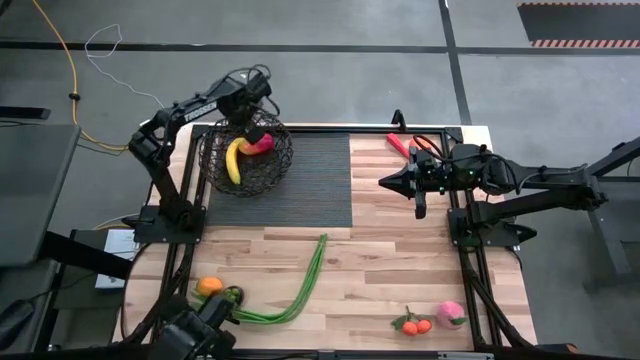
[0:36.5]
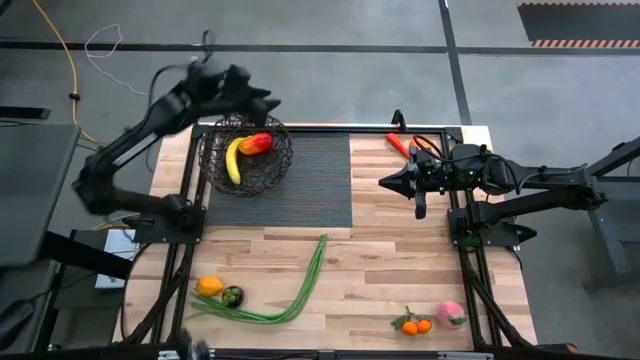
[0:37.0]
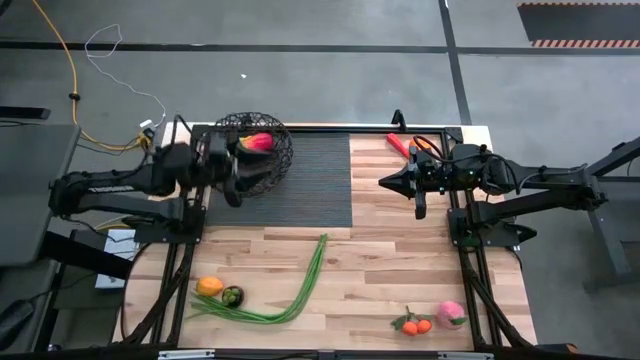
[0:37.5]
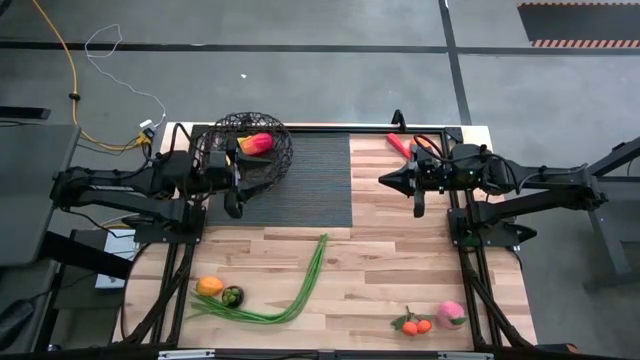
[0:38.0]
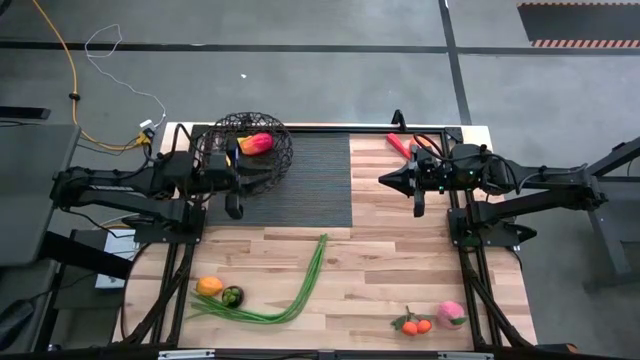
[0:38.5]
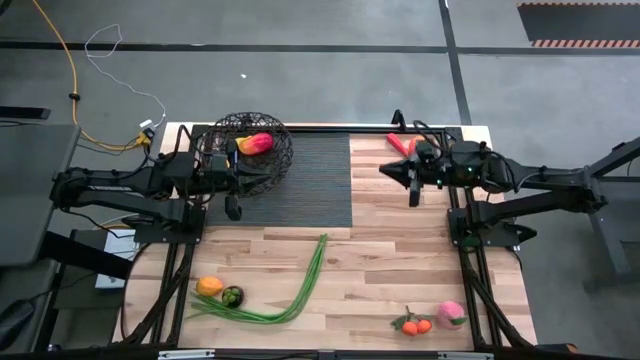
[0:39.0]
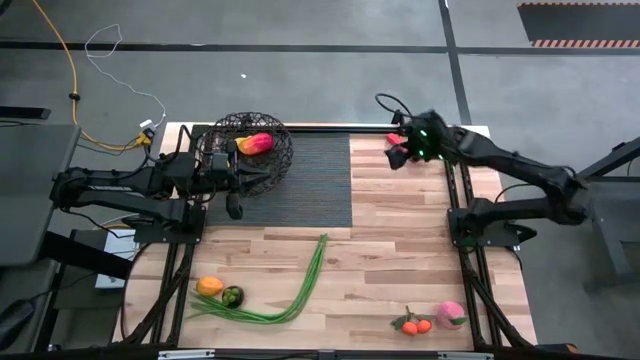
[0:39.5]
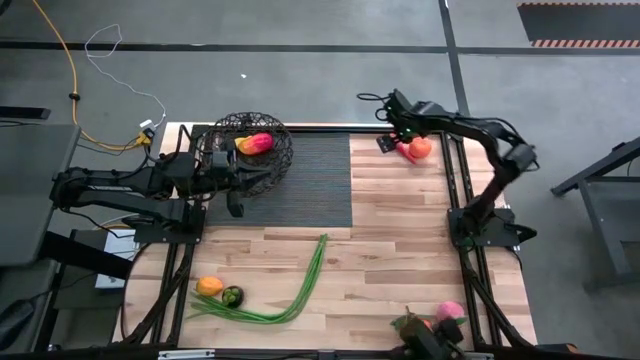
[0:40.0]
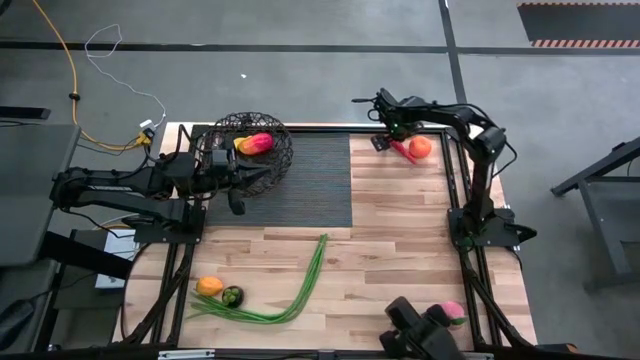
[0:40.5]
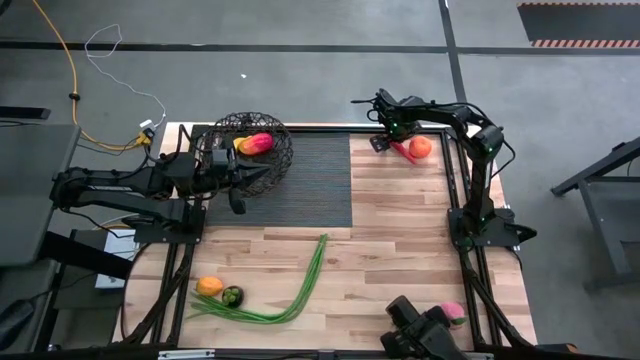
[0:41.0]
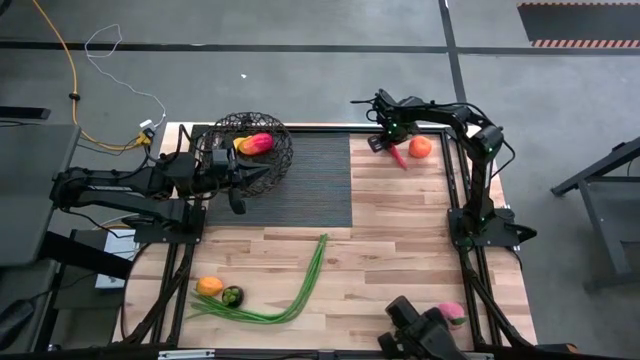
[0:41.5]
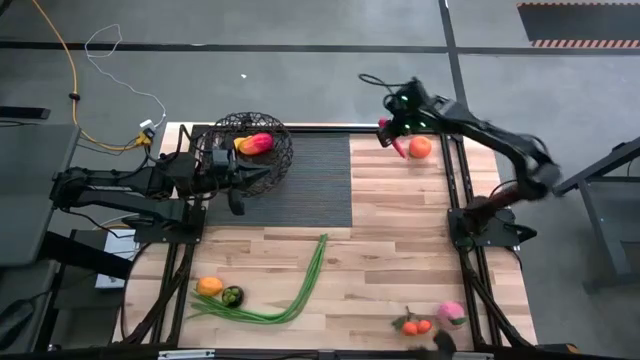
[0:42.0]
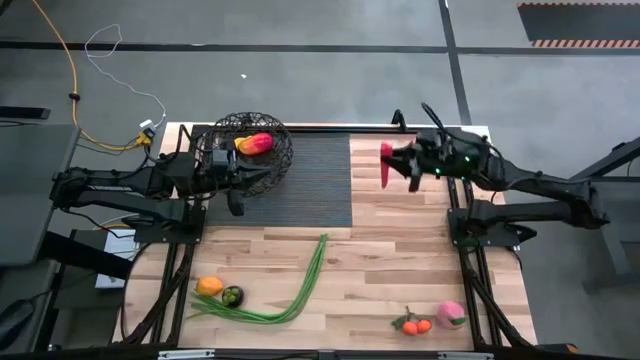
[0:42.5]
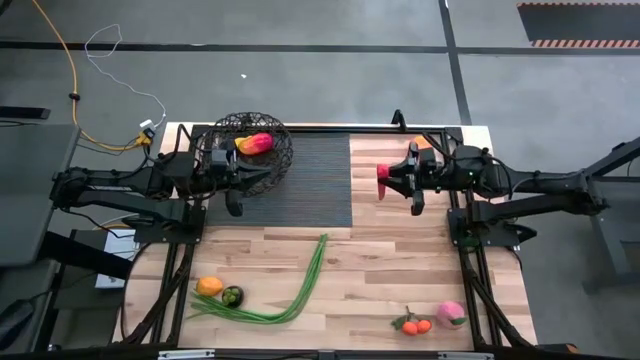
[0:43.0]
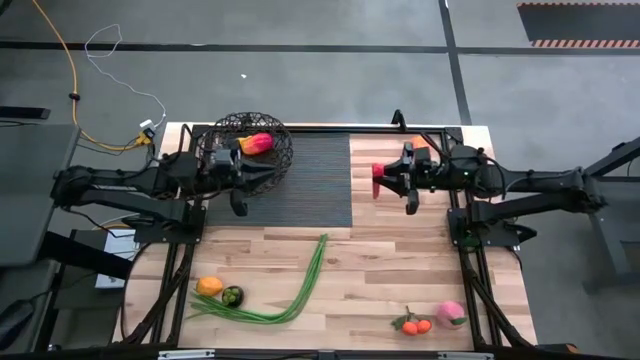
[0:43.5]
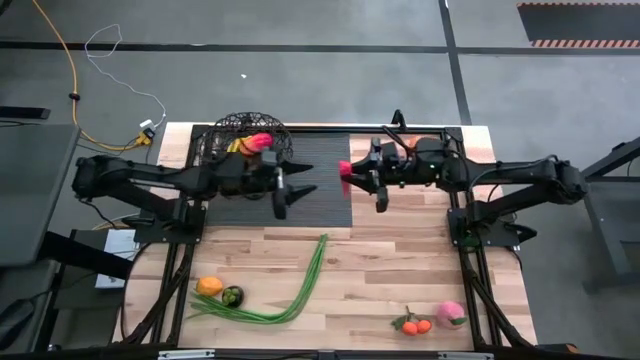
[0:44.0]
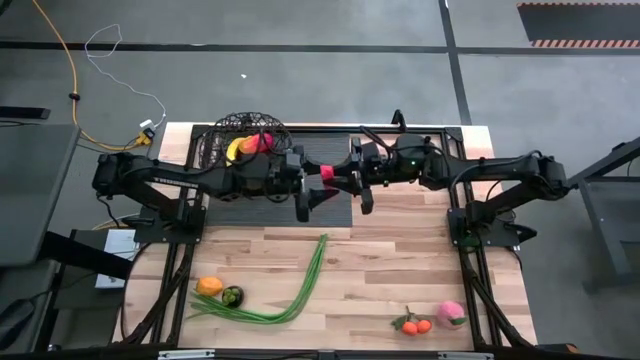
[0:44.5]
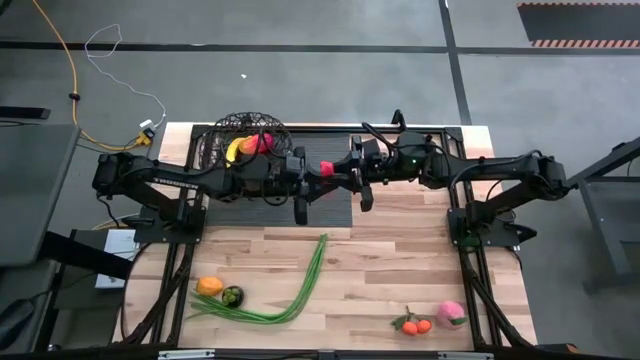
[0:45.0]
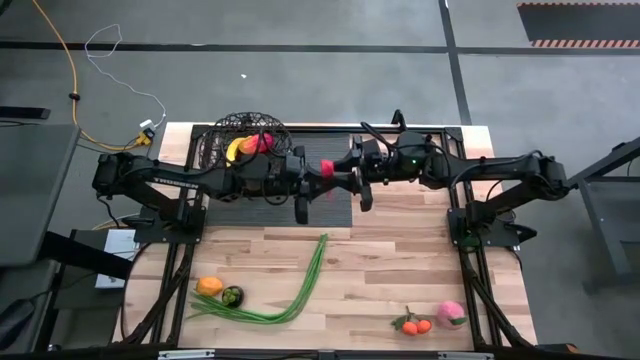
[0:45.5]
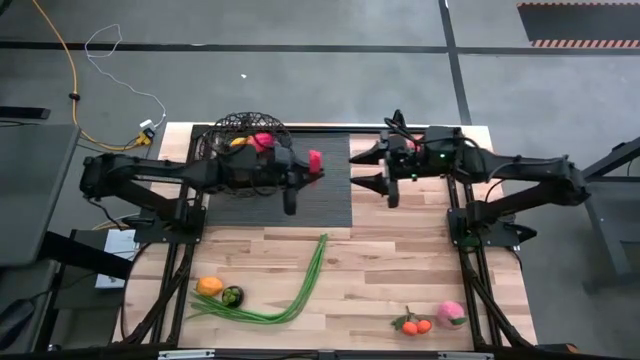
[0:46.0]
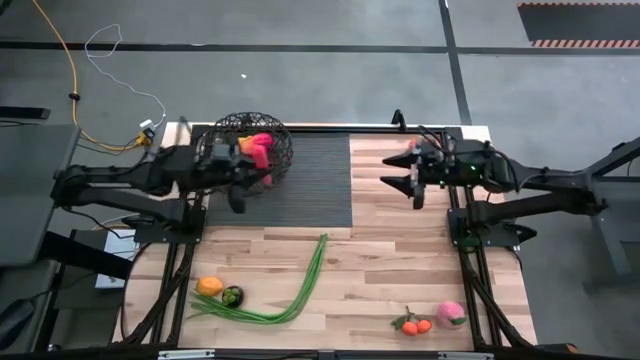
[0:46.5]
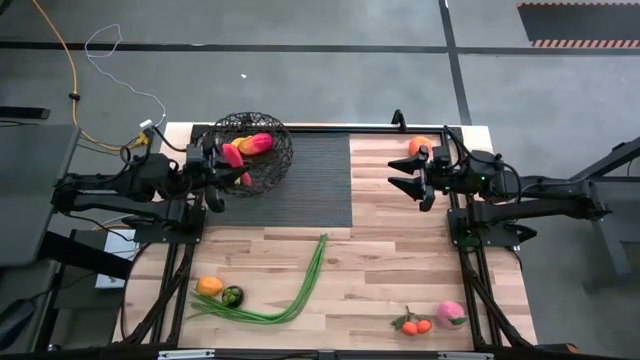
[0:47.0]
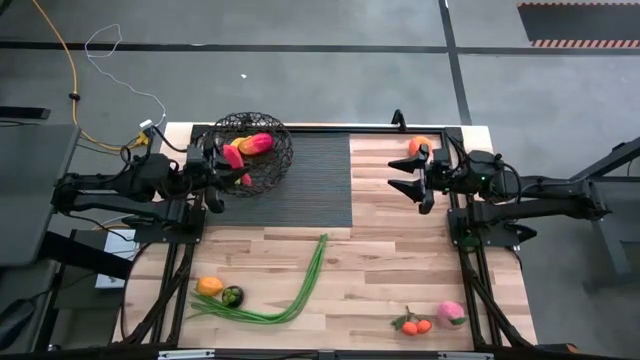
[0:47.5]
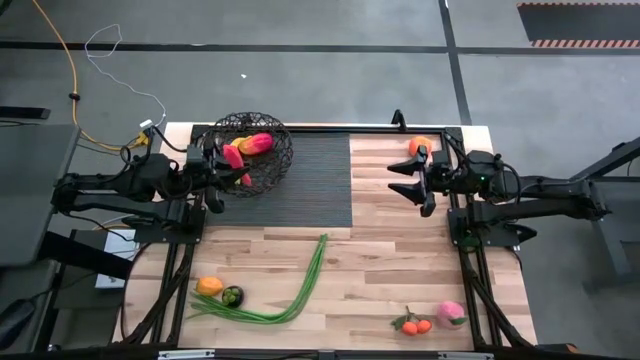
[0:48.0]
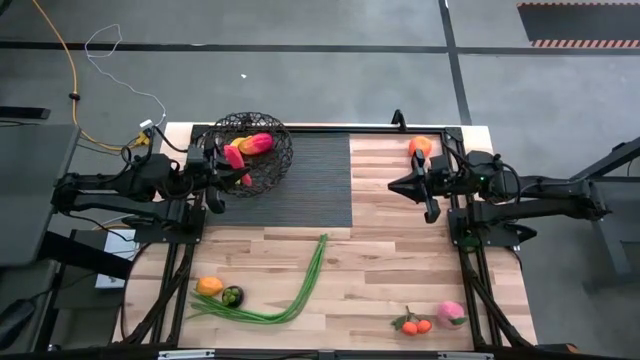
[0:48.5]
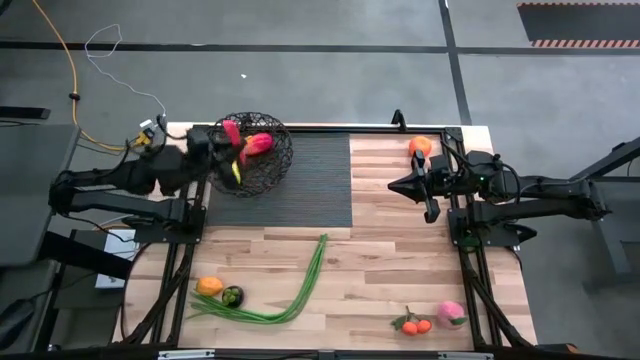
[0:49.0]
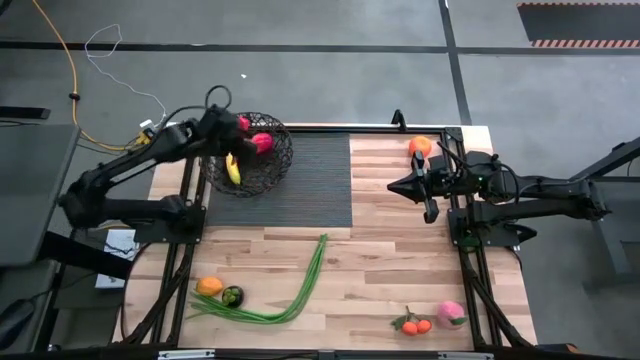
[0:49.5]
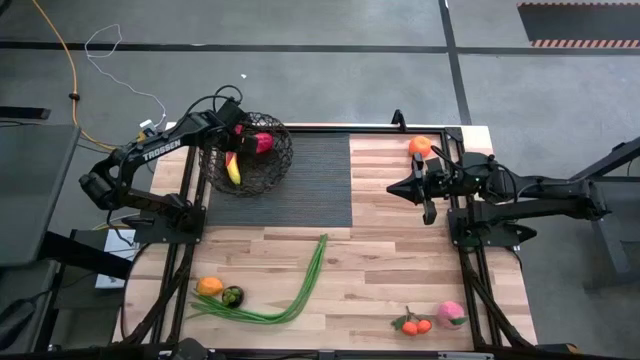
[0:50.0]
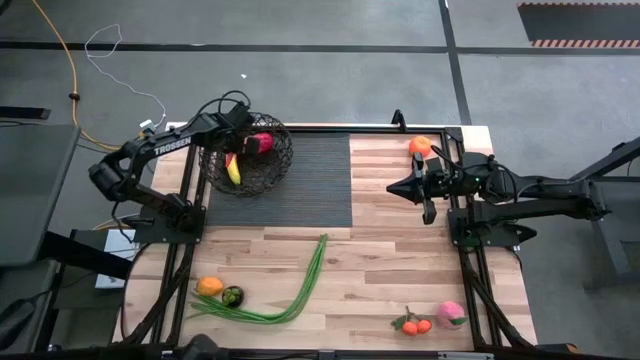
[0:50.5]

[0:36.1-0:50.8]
Task: Build produce basket
Put the red chili pepper into the black basket

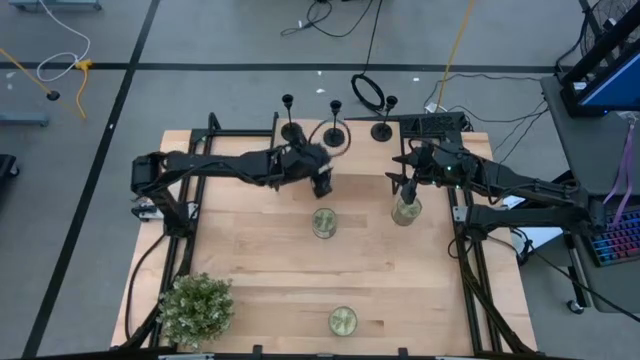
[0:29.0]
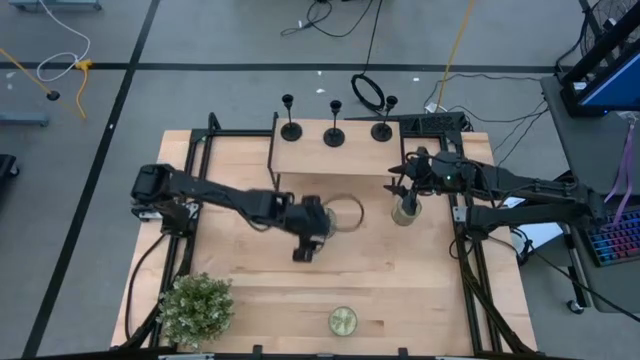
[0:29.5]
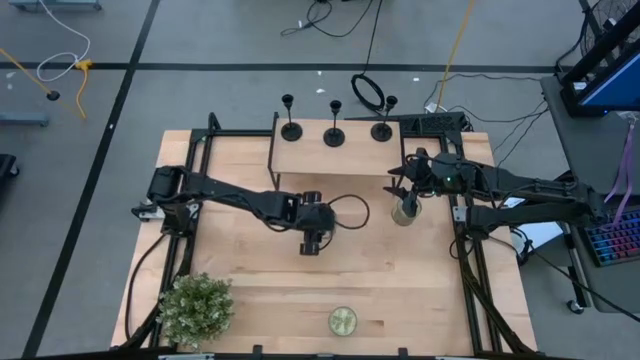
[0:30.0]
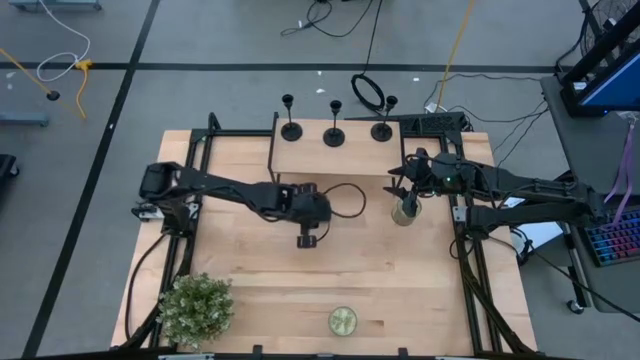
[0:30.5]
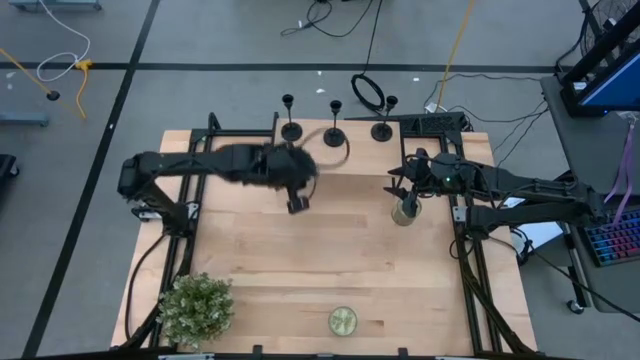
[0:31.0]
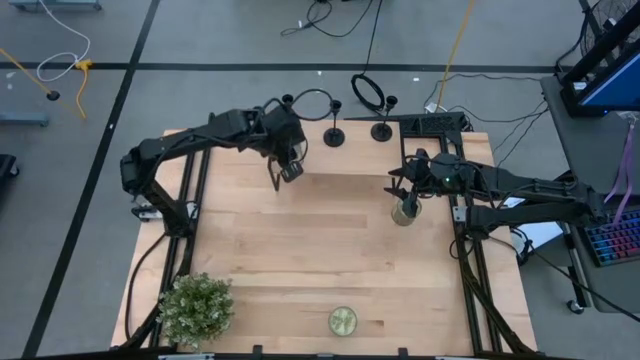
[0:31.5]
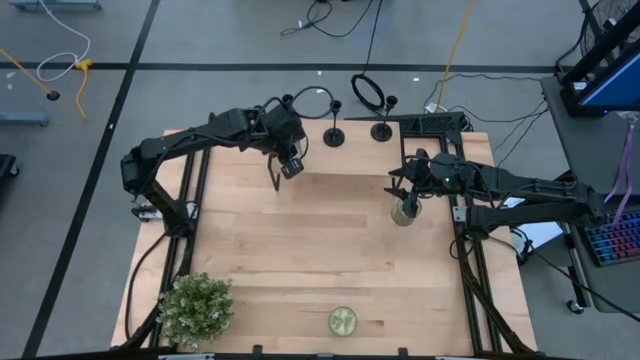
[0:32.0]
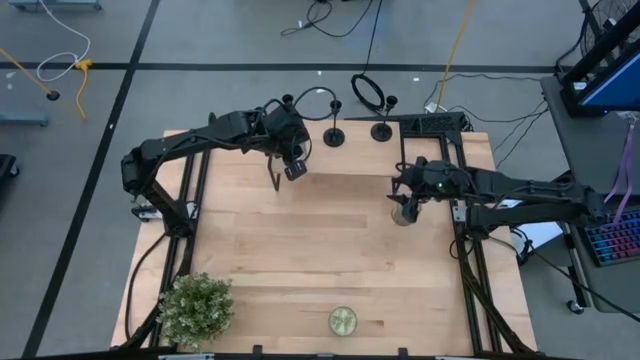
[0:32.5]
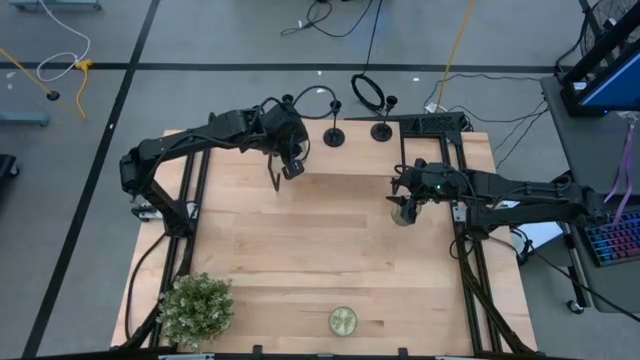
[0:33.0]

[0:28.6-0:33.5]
Task: Pick & Place candle stick holders
Put the top left light green scented candle on the shelf
